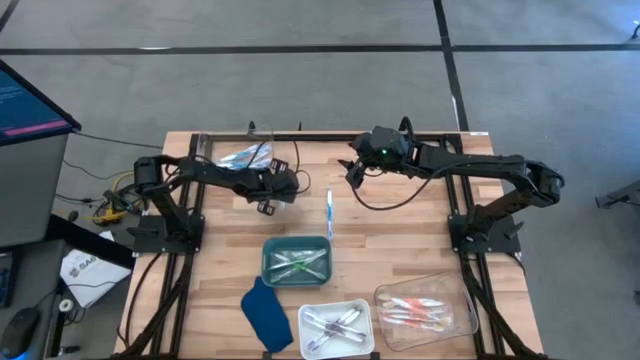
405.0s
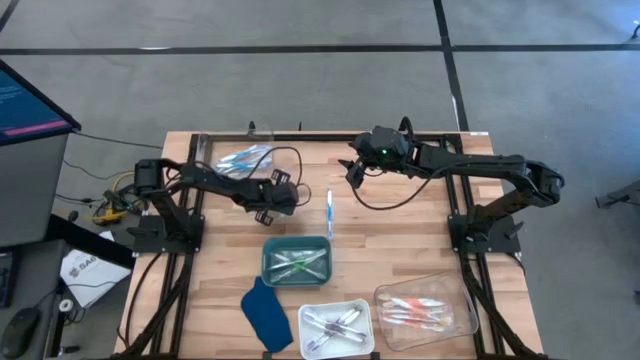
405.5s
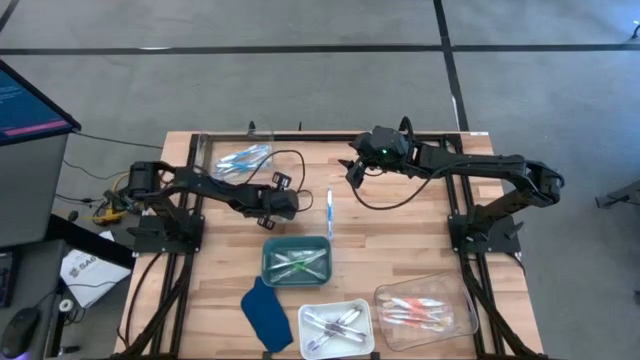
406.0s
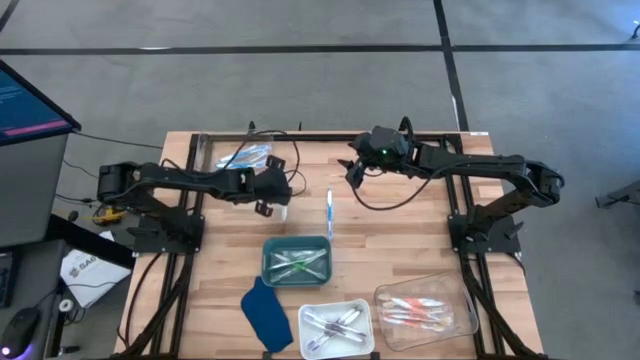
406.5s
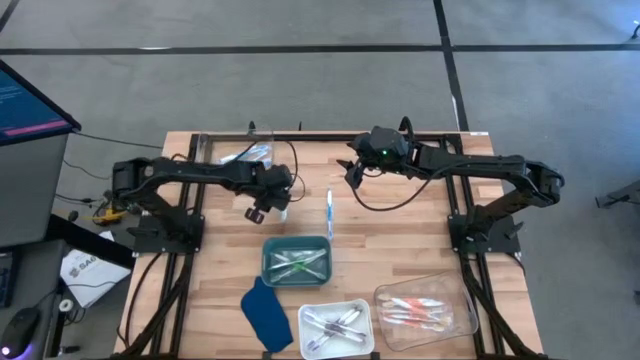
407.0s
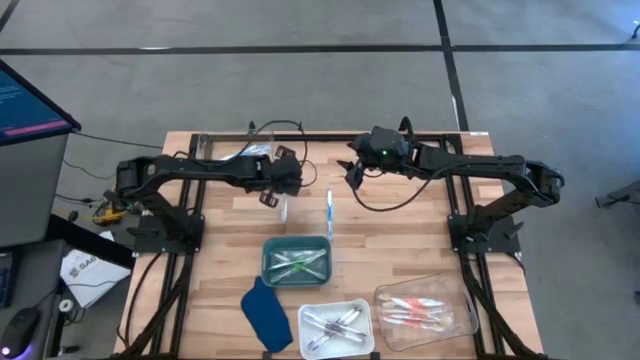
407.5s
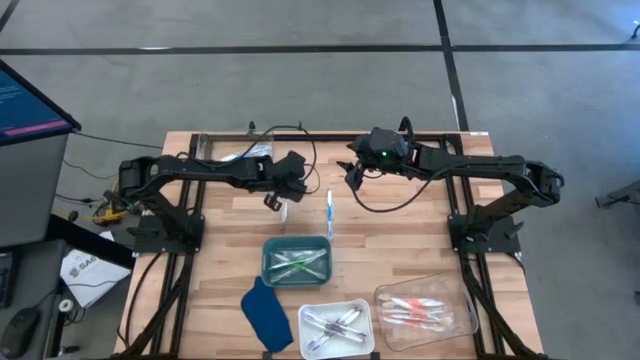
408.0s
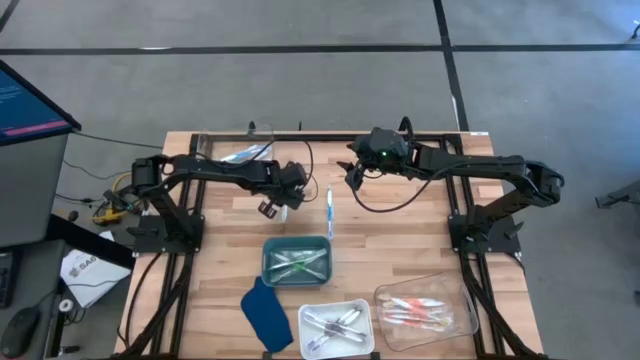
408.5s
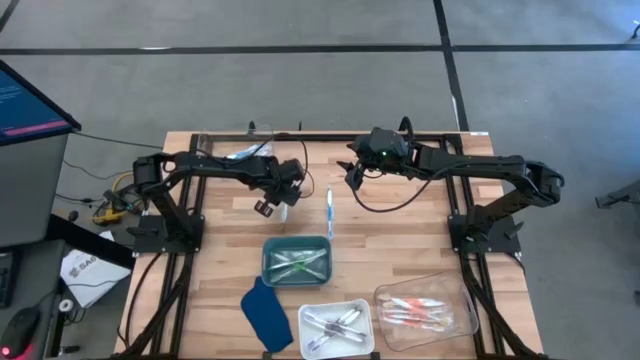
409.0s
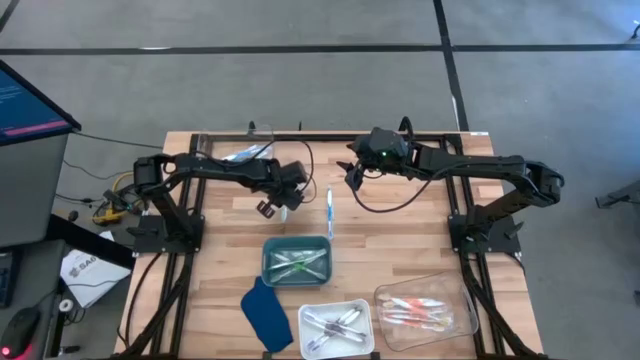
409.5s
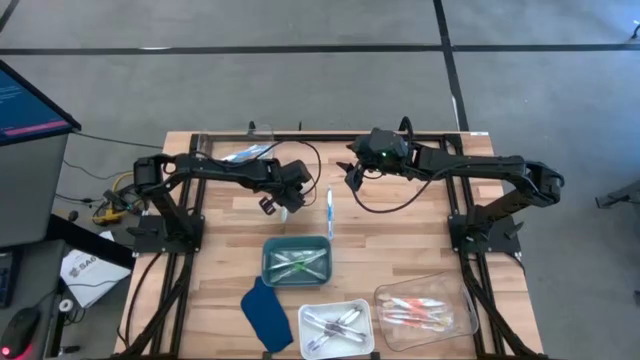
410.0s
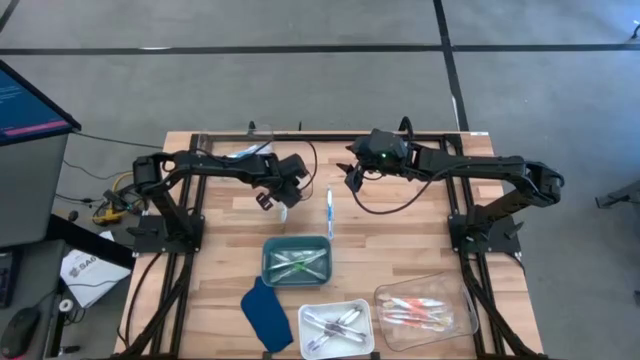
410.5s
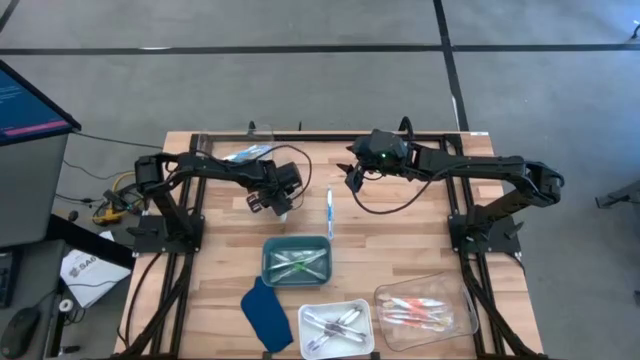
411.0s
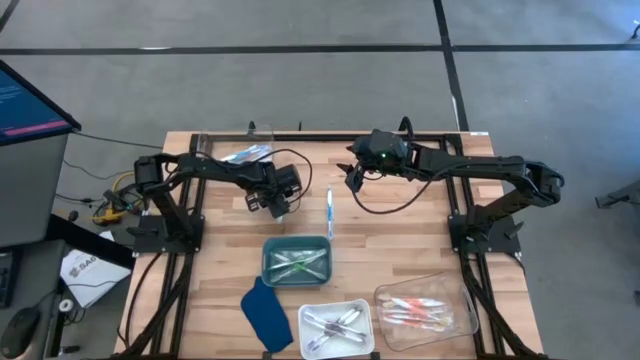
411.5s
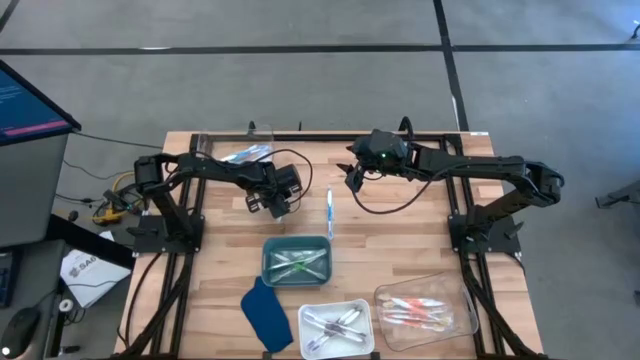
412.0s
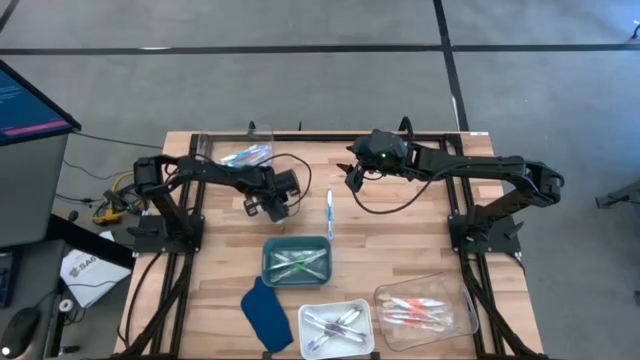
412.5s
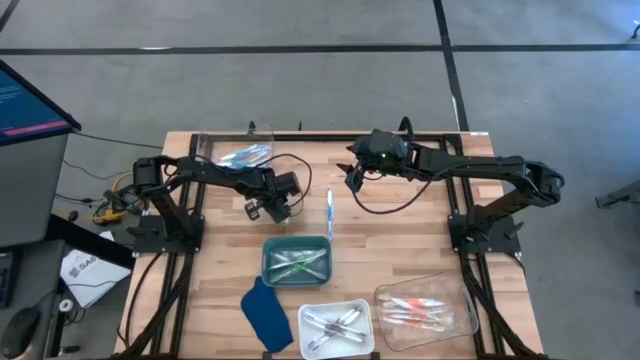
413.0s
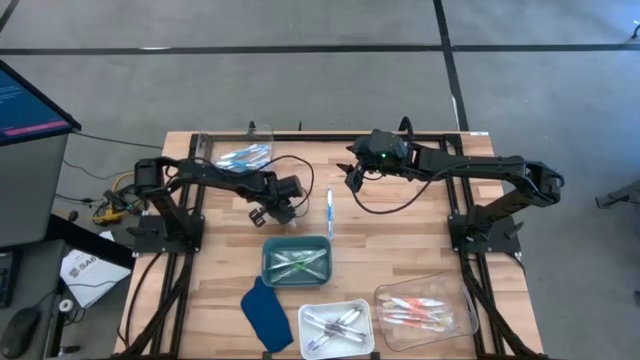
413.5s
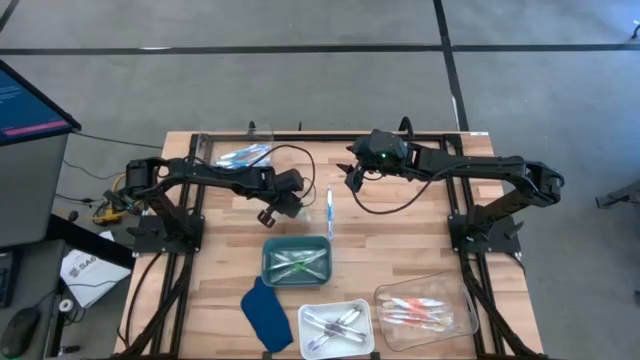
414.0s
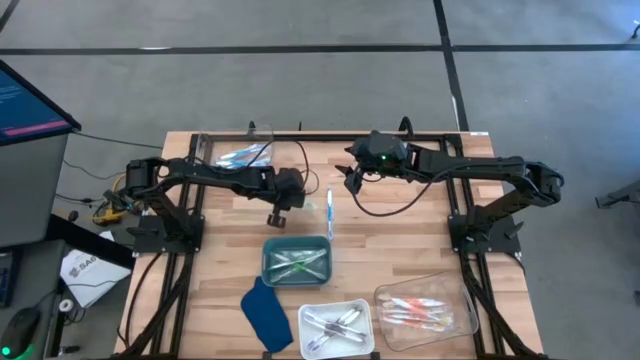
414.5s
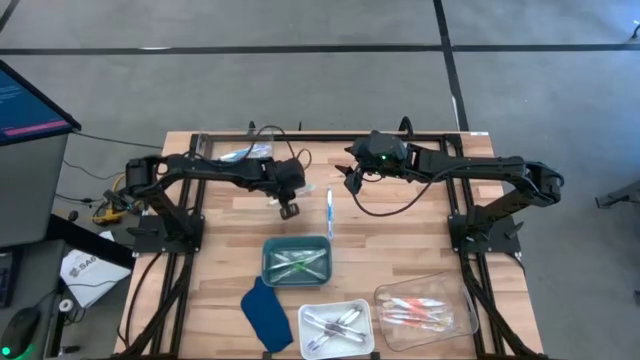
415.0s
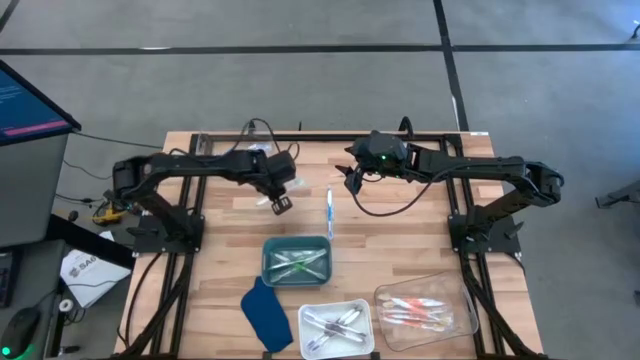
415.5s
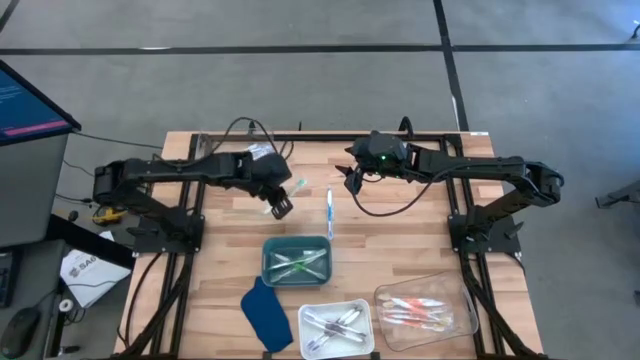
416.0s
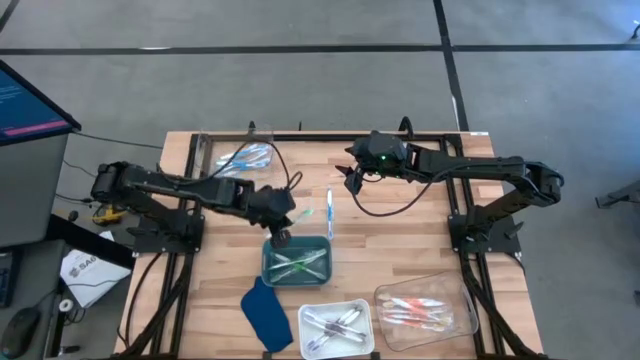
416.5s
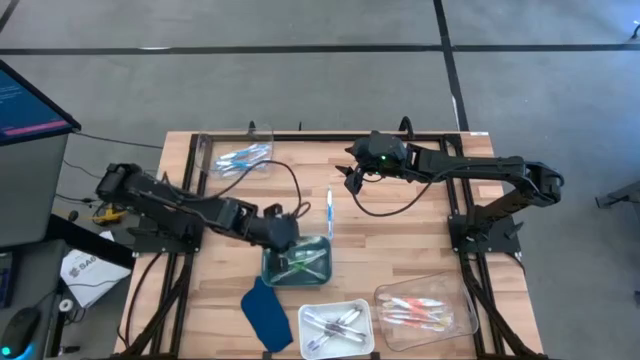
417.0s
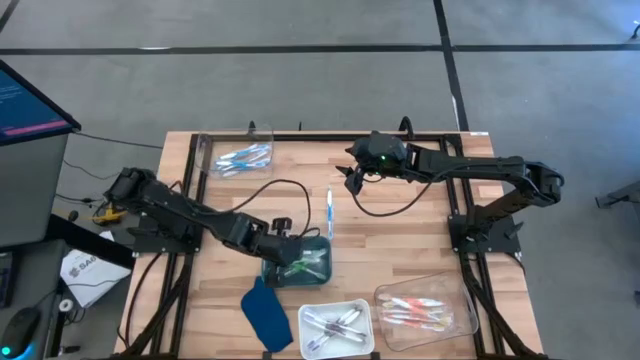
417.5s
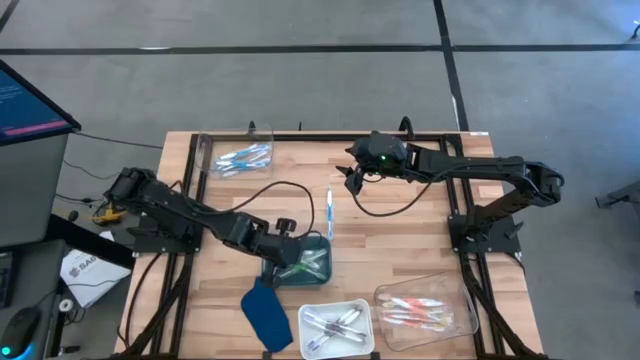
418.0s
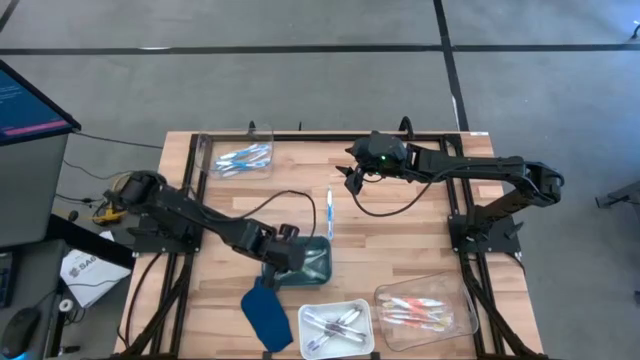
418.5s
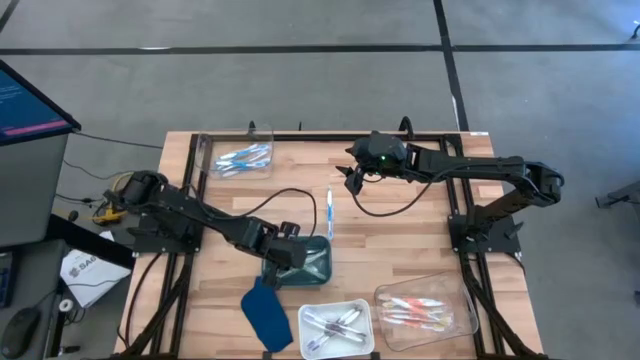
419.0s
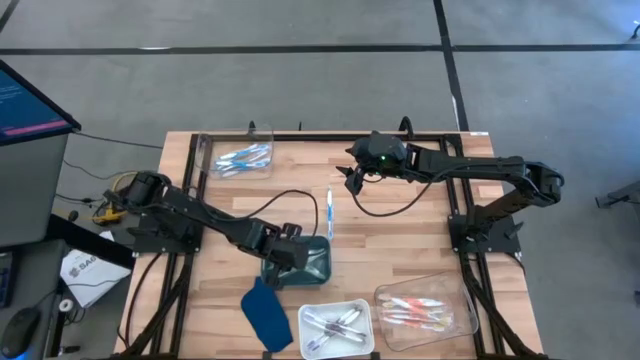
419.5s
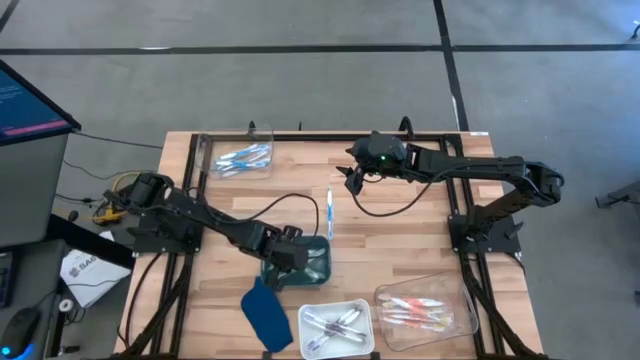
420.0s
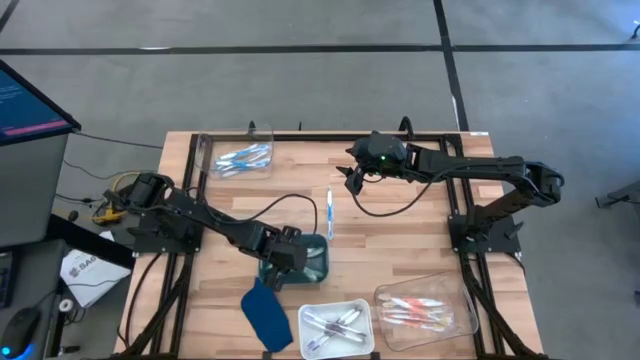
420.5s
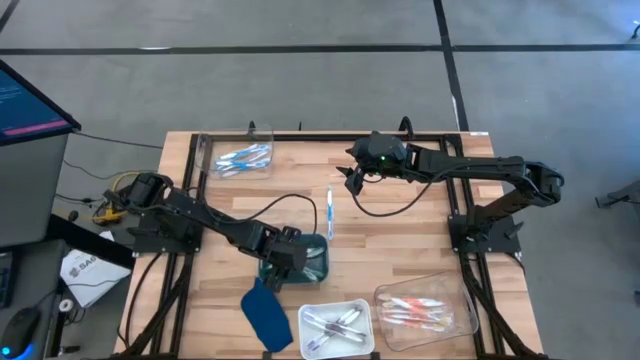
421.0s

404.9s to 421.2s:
Task: Pick & Place Toothbrushes
Put the green toothbrush into the green bin

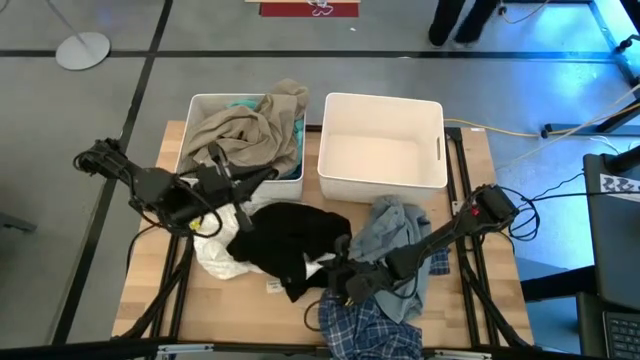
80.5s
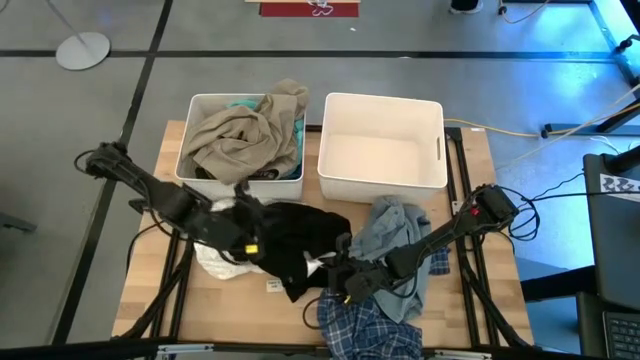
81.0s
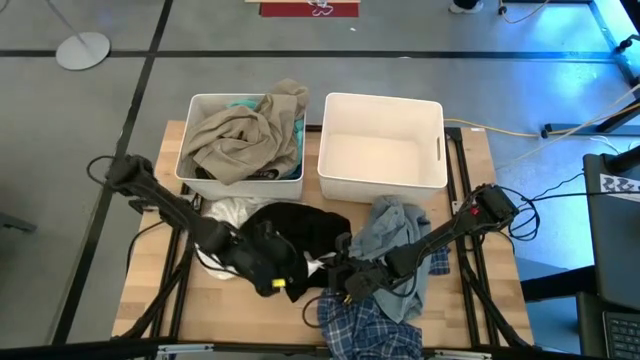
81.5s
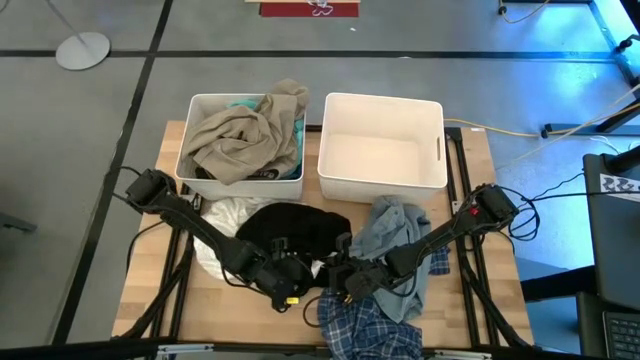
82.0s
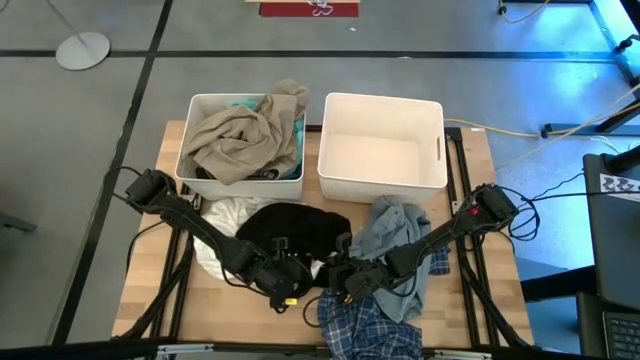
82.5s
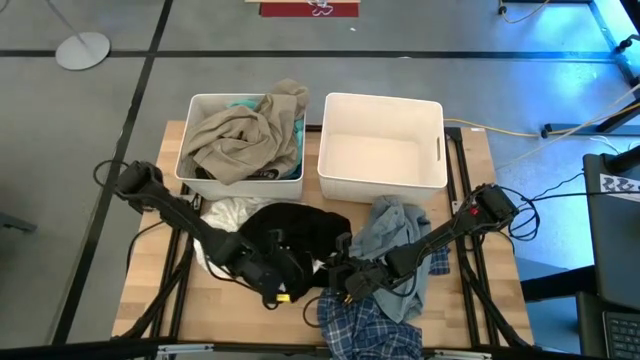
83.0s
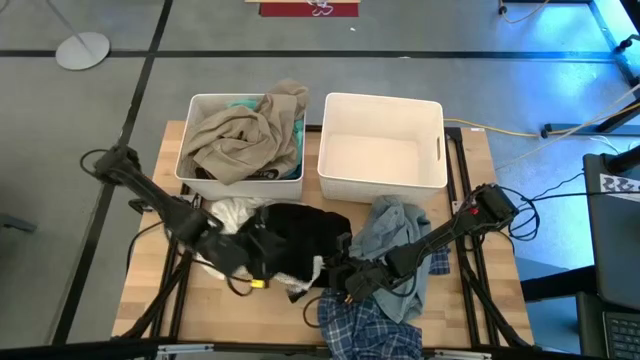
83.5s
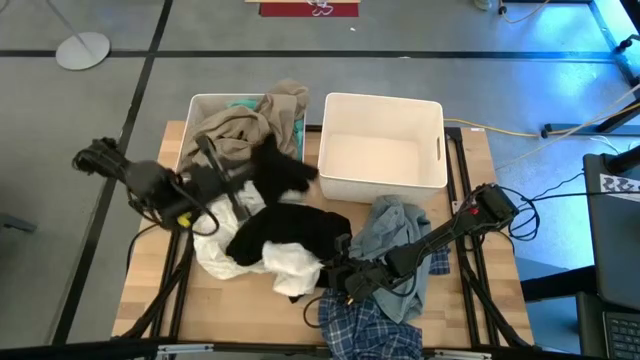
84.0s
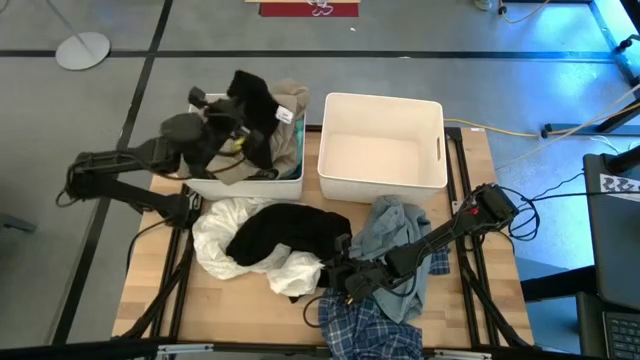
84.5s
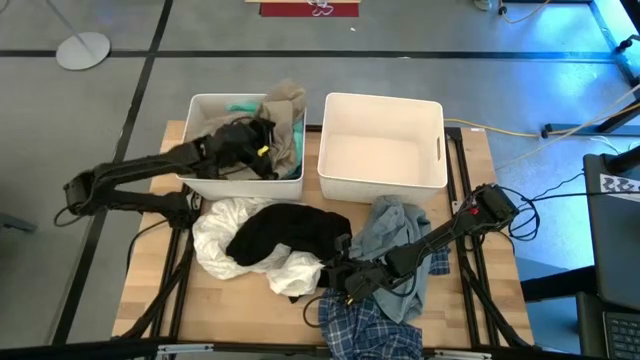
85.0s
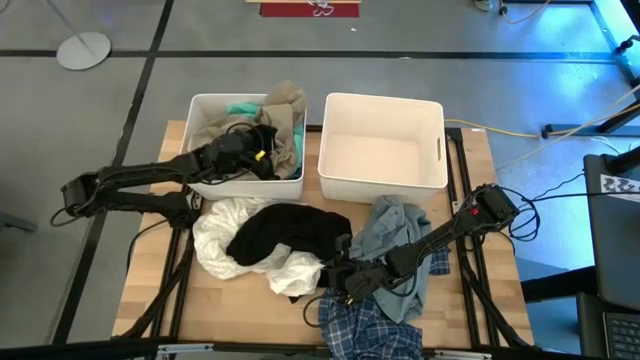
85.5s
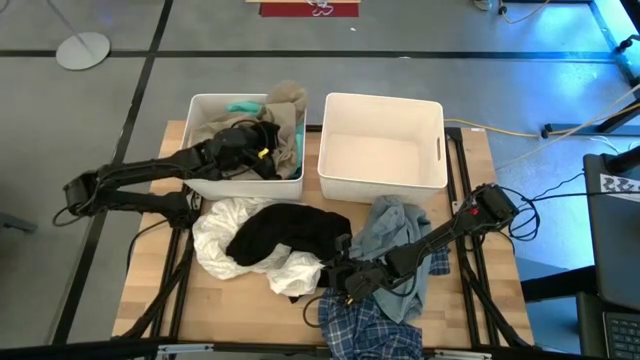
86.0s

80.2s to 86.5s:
Task: Sort clothes
Put the black underwear into the left white bin
